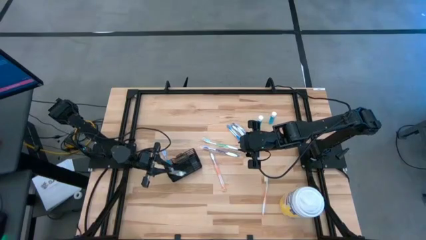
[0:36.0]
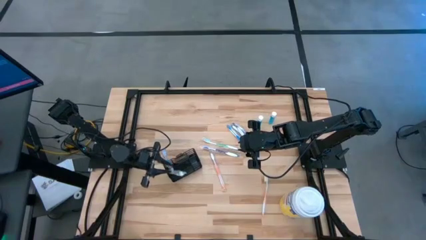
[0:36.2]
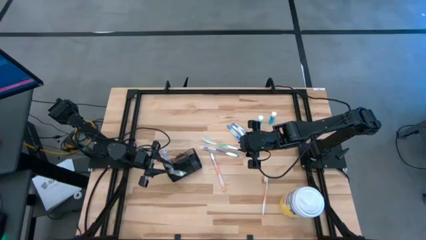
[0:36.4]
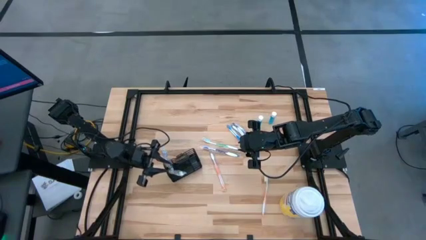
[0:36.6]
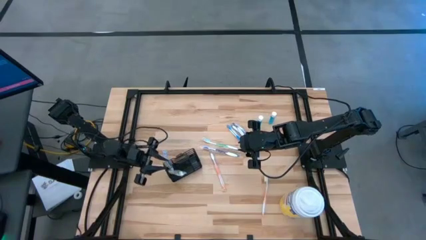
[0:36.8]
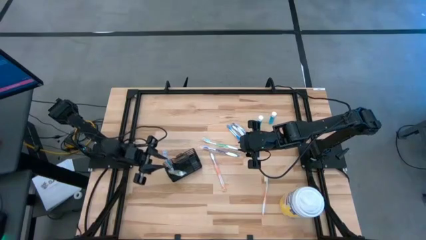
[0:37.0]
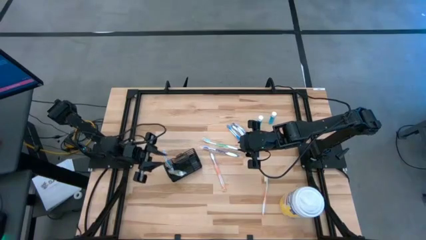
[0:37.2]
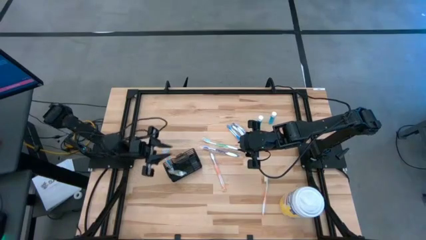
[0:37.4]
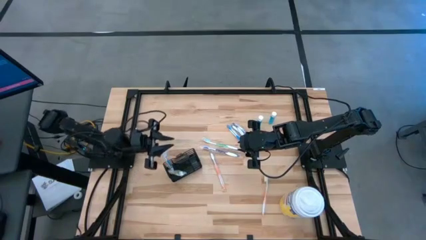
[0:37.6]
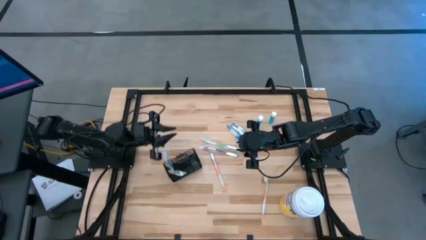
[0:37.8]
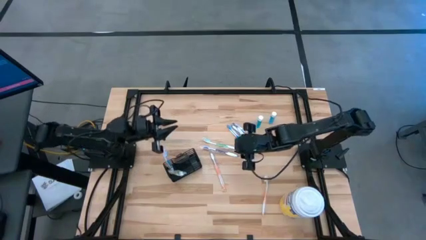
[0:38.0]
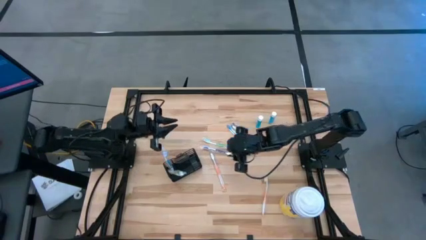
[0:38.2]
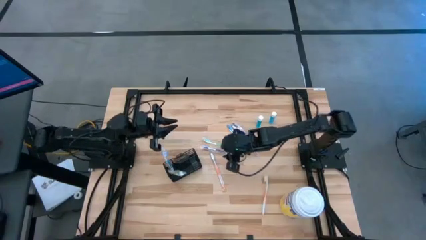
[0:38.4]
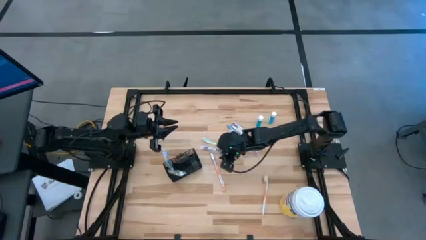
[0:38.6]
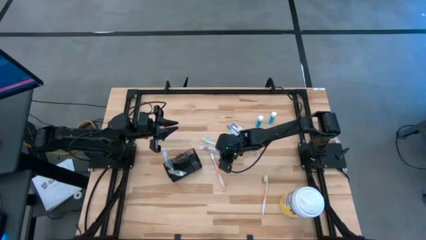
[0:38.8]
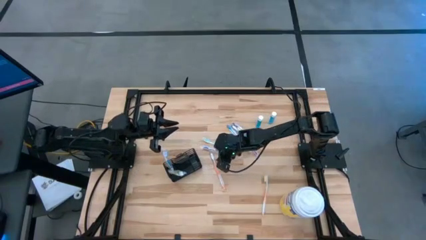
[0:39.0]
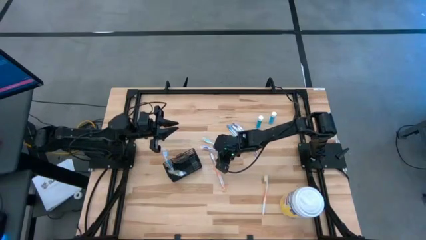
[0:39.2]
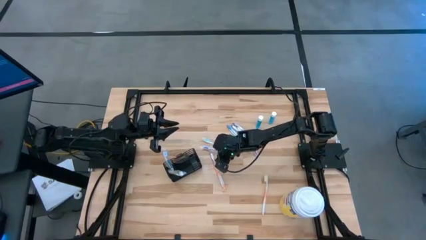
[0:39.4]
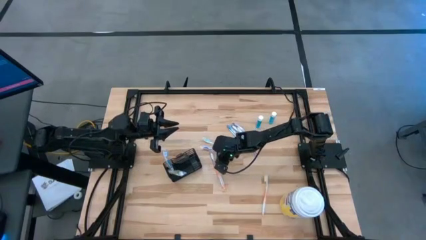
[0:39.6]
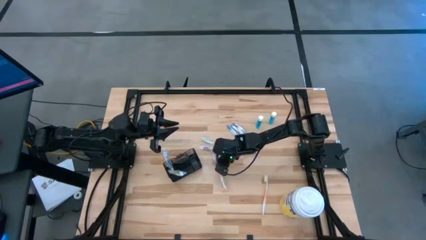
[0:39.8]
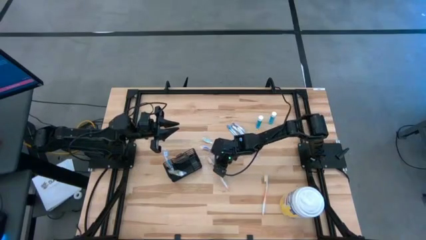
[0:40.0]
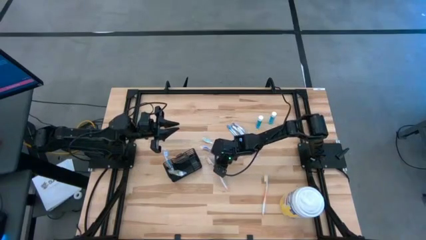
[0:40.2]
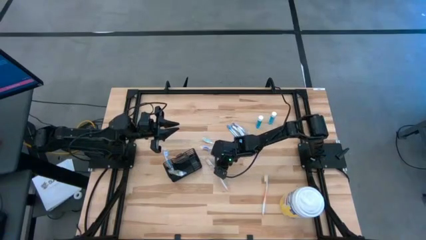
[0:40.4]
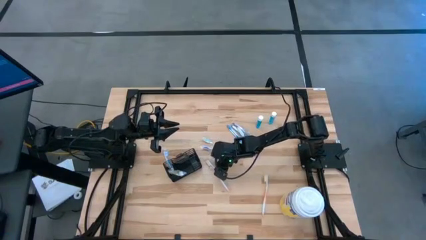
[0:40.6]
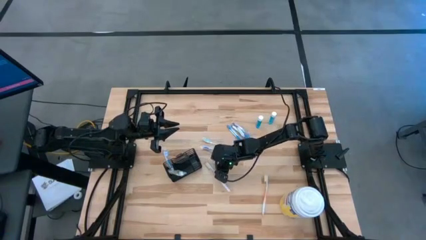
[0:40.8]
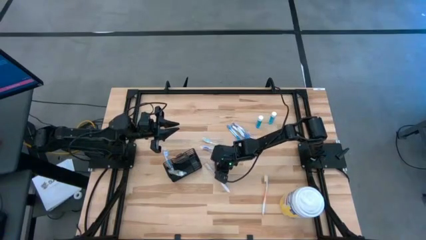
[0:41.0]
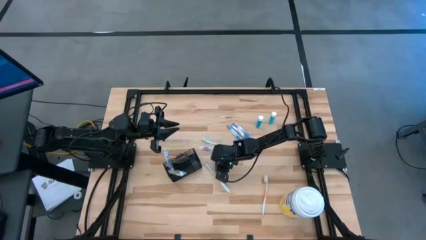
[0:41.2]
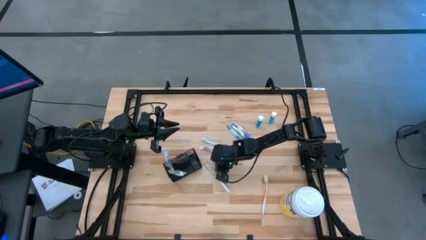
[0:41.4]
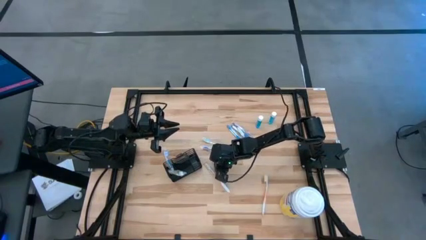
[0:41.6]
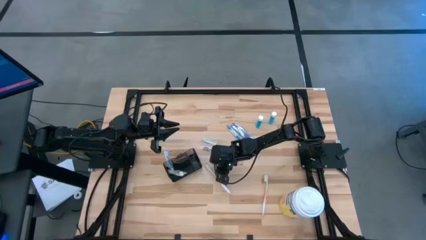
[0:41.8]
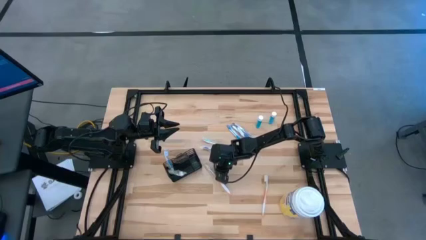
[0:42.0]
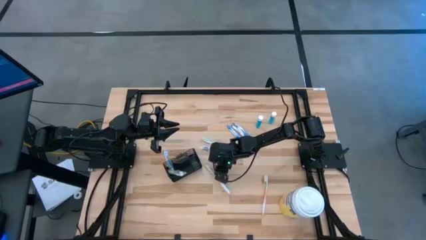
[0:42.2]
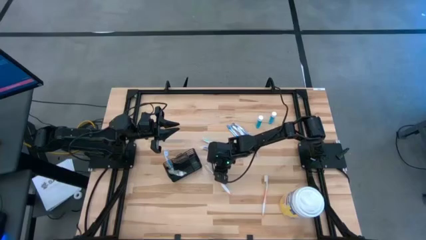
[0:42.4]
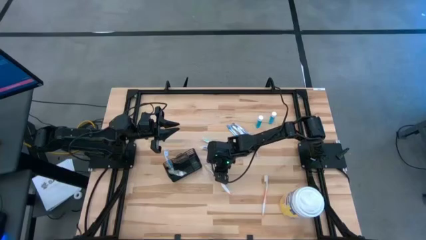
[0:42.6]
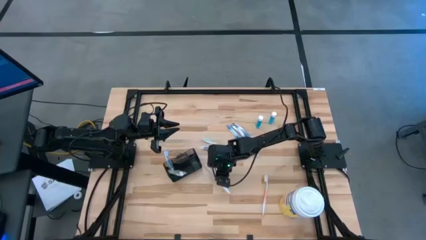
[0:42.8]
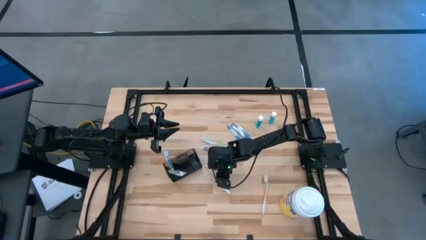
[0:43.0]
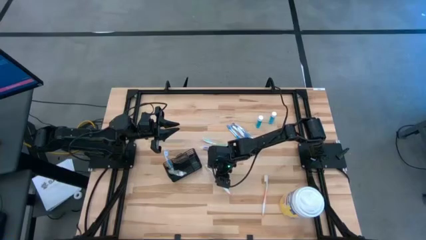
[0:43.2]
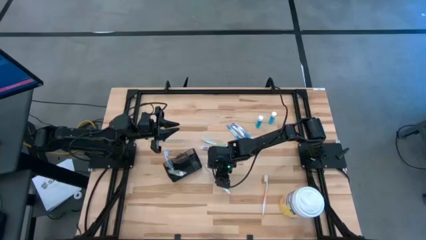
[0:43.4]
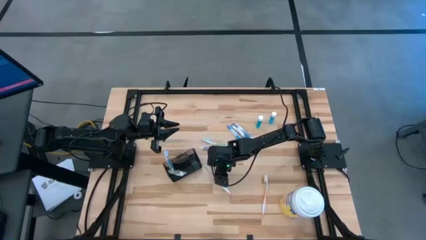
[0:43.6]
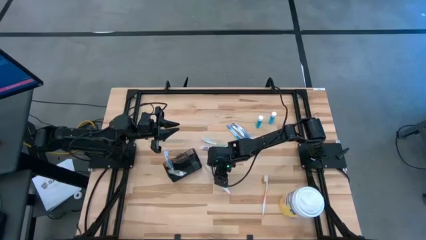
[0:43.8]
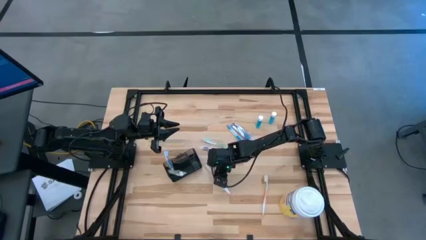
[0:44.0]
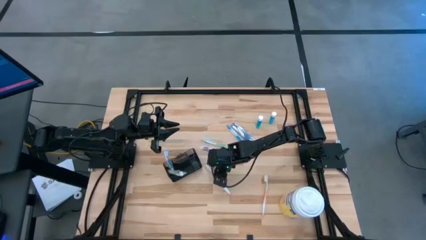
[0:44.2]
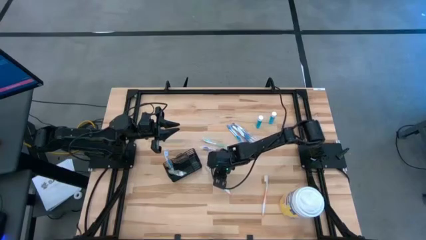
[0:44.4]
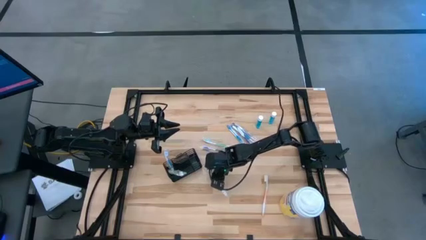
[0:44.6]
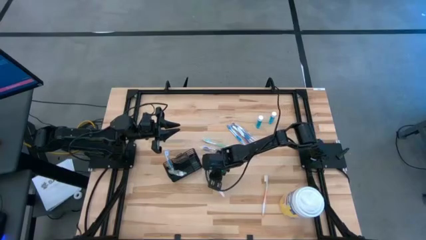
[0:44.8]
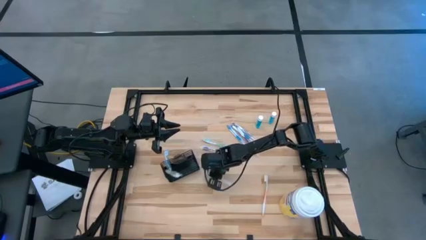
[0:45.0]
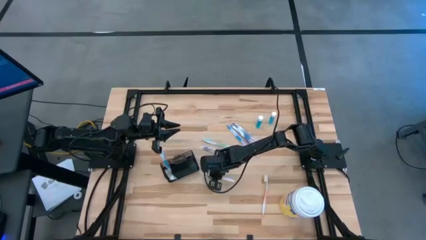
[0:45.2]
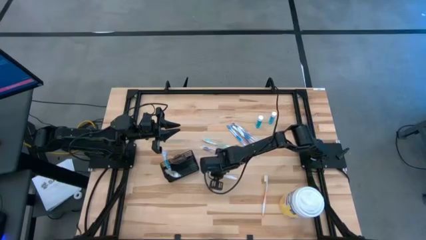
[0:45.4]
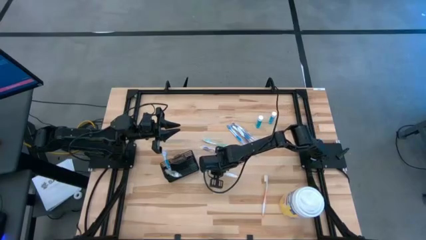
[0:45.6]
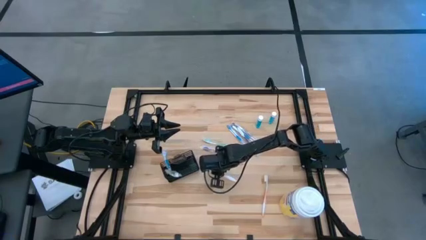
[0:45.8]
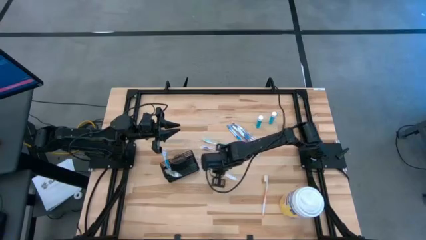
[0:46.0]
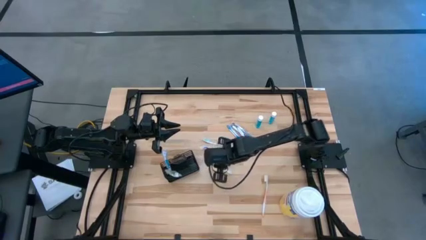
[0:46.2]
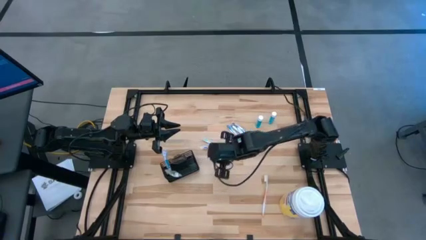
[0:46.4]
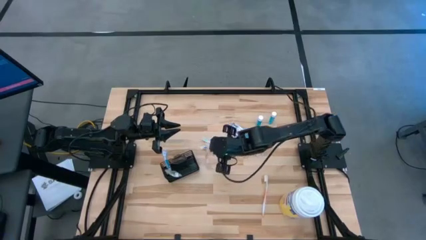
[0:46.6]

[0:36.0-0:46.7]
Task: Pick & Place toothbrushing station
Put the left orange toothbrush into the bottom left section of the mesh organizer

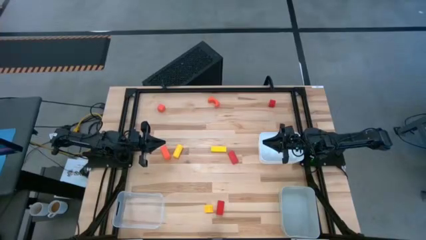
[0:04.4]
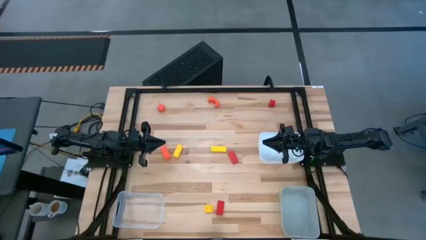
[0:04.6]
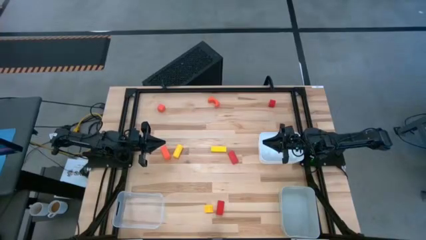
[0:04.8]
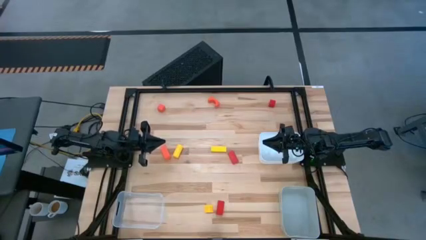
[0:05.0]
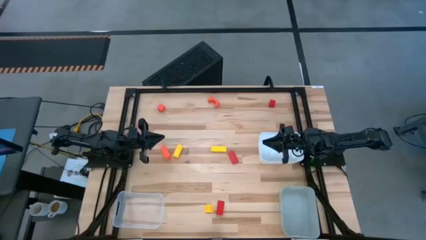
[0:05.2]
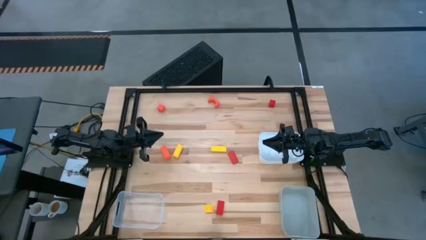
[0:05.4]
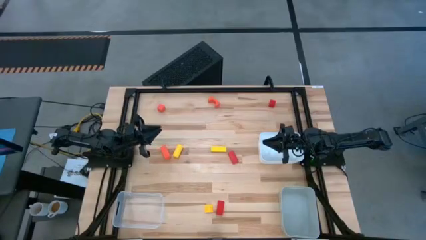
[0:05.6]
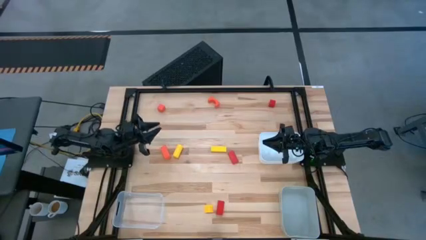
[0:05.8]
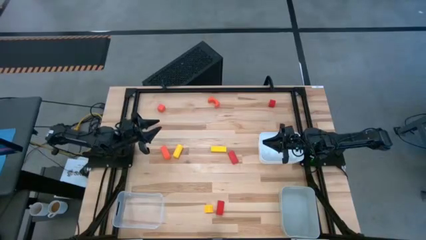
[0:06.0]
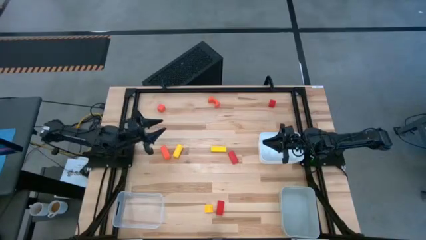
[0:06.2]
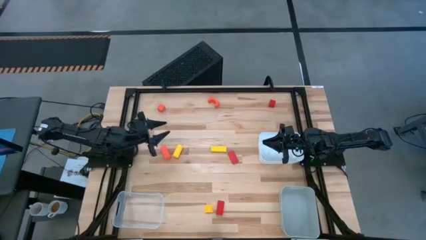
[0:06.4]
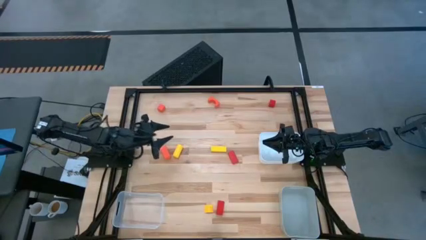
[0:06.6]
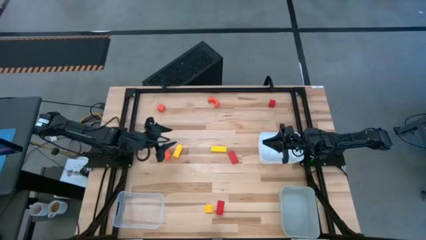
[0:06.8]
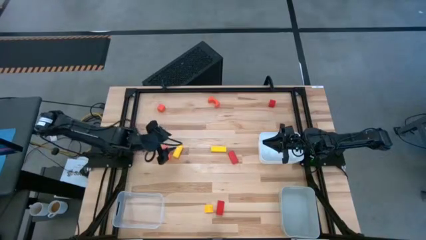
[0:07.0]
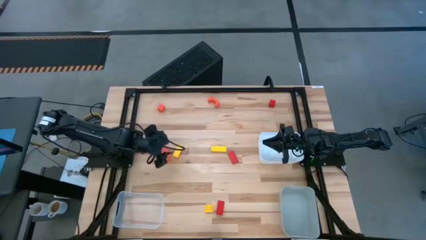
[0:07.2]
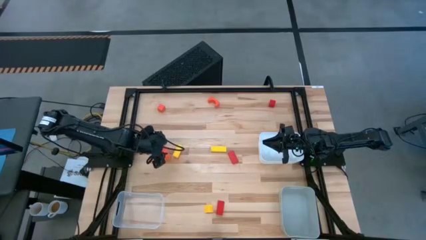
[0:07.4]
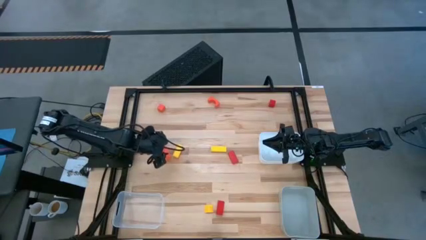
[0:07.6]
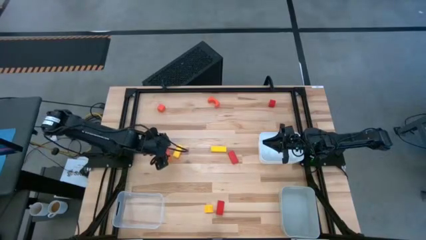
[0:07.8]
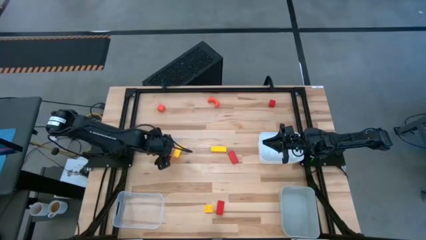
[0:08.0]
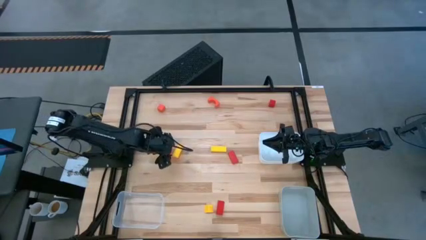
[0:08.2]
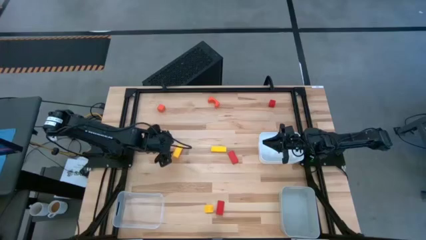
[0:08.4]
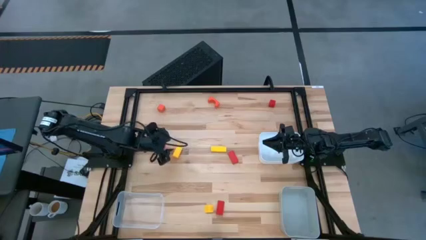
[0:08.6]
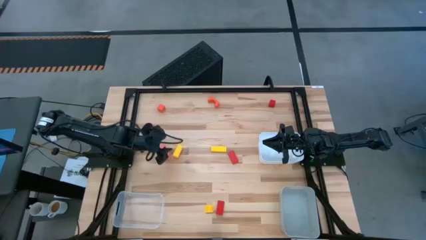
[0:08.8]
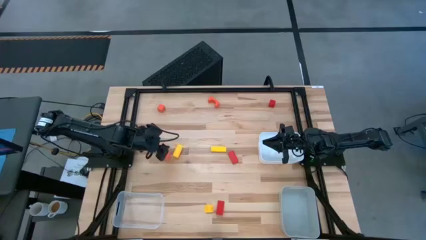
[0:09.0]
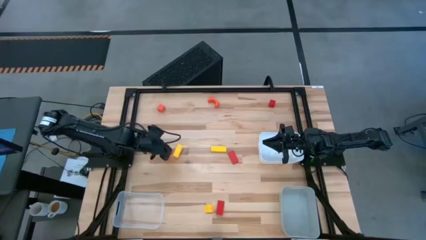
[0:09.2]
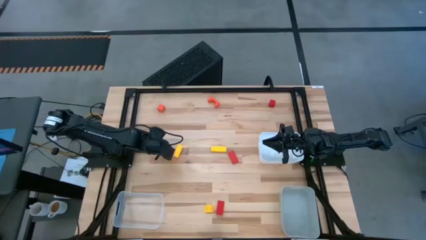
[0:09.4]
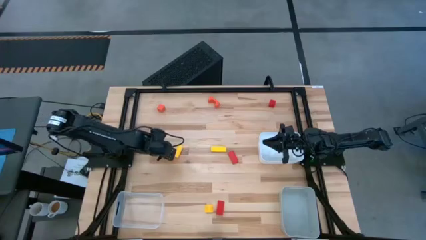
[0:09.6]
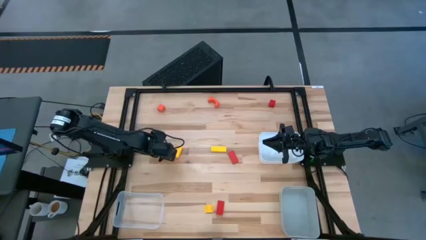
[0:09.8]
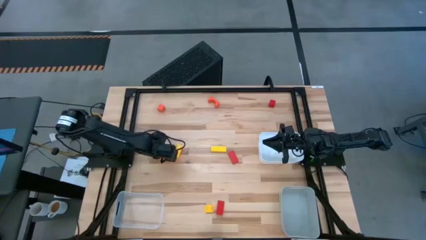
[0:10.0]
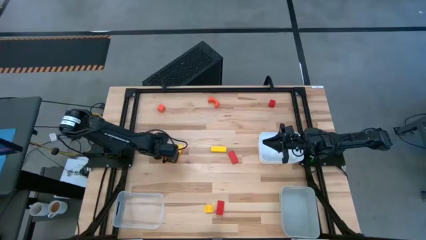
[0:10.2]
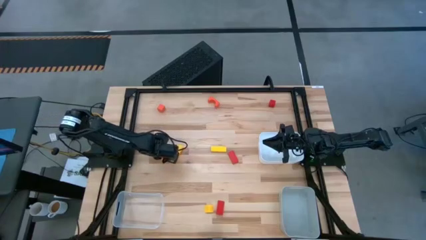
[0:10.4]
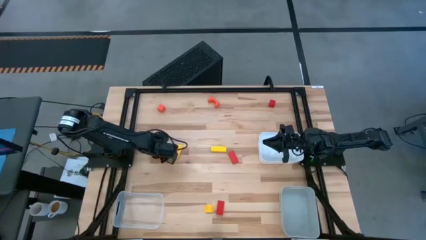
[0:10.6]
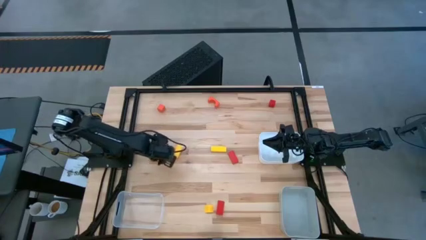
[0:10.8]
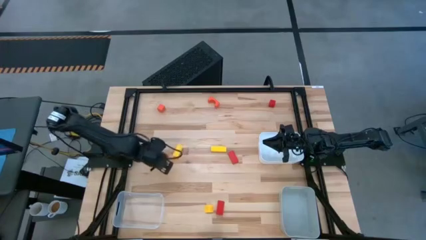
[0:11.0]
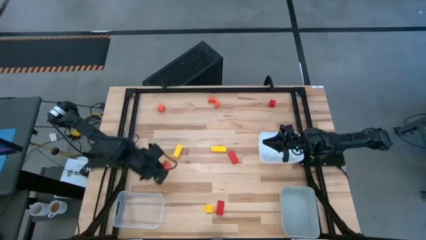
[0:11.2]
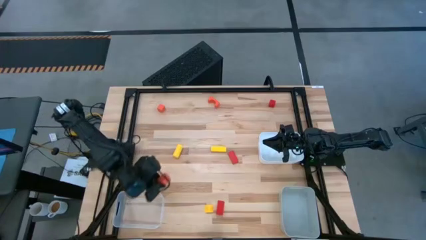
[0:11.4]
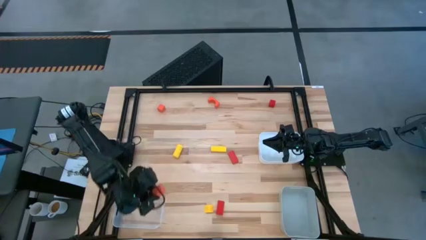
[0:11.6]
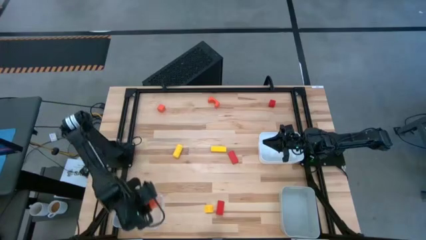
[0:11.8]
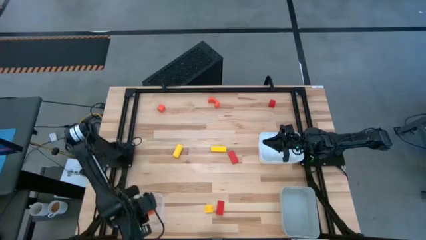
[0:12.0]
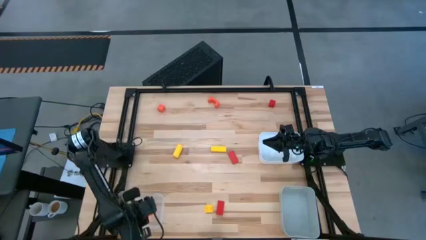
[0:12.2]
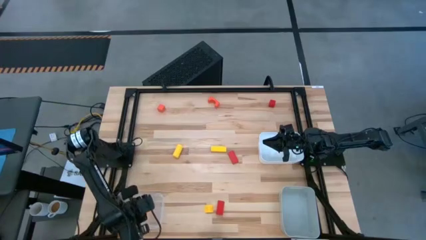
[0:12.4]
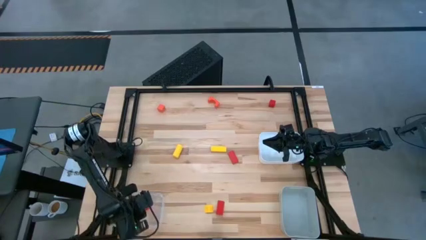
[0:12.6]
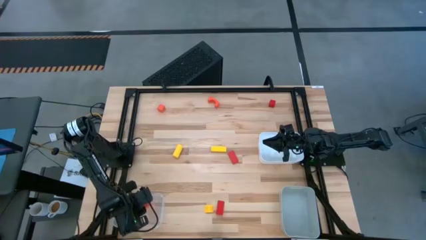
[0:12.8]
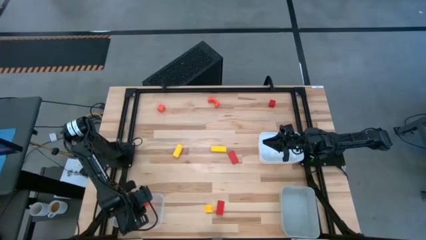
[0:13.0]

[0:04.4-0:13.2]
Task: Sort & place blocks by color
Put the bottom left orange block into the transparent bin
